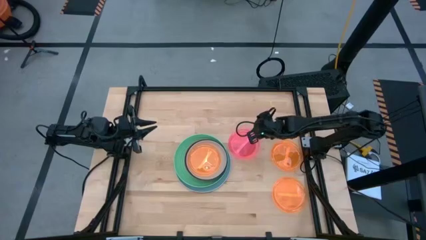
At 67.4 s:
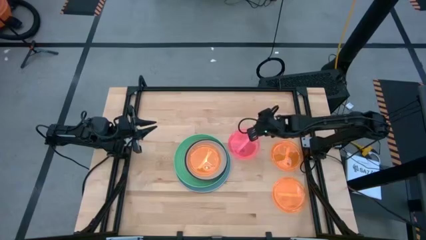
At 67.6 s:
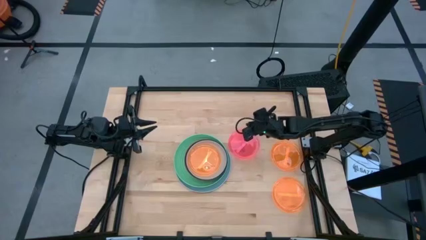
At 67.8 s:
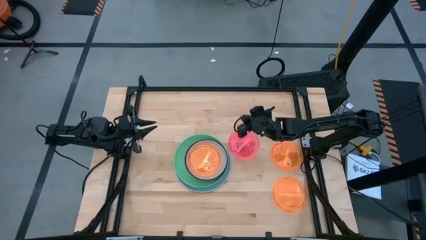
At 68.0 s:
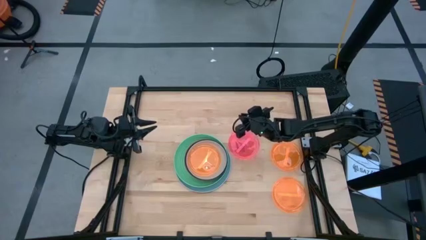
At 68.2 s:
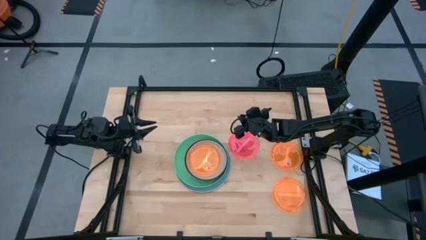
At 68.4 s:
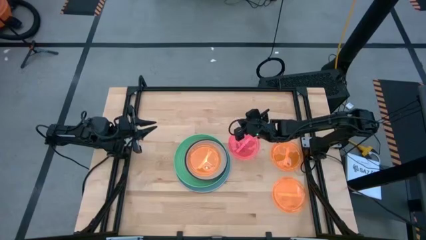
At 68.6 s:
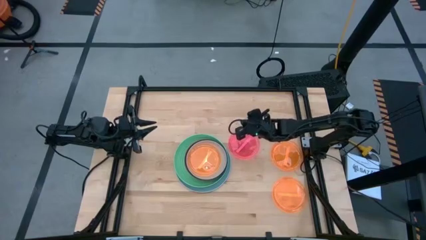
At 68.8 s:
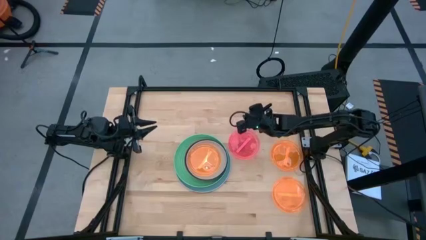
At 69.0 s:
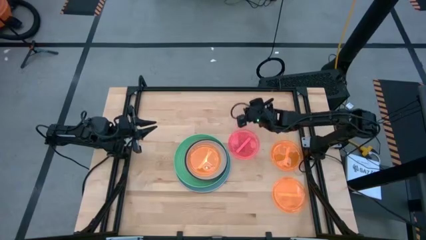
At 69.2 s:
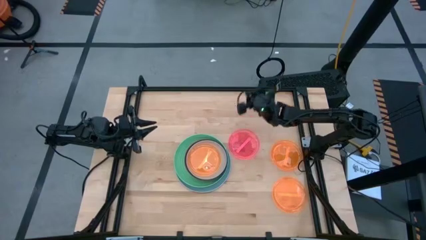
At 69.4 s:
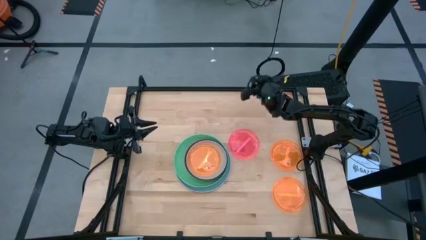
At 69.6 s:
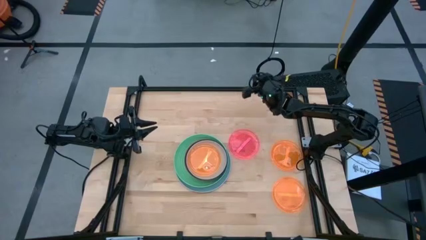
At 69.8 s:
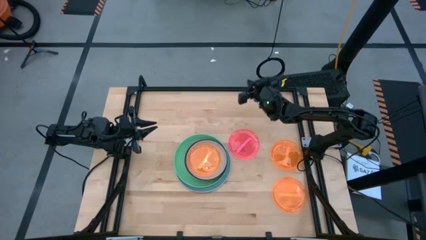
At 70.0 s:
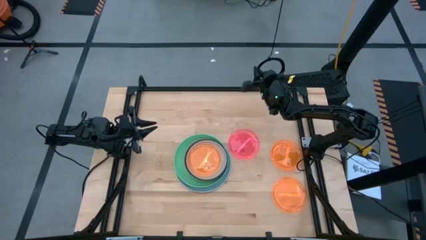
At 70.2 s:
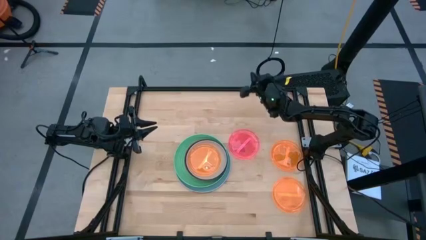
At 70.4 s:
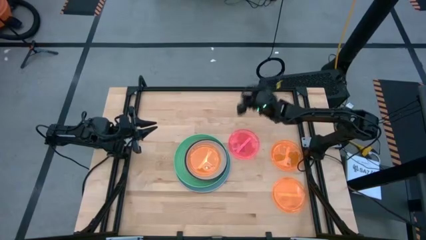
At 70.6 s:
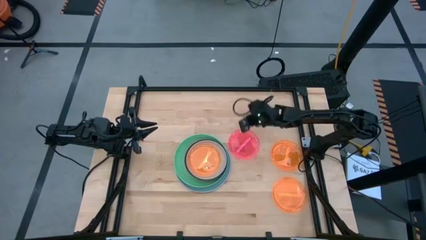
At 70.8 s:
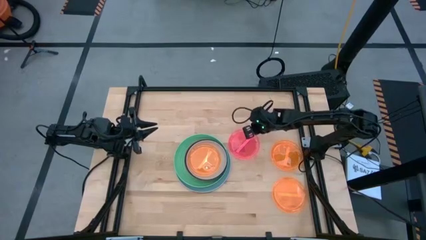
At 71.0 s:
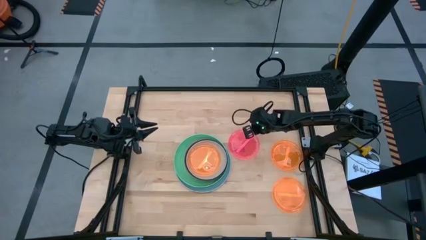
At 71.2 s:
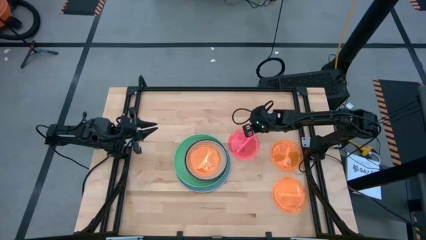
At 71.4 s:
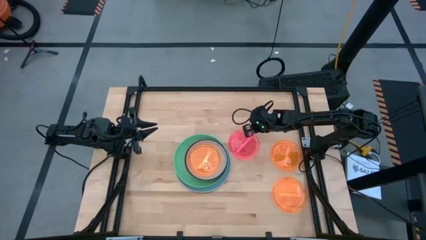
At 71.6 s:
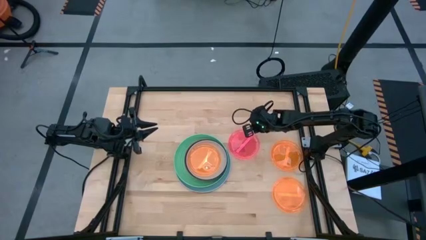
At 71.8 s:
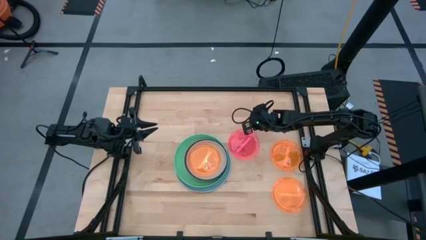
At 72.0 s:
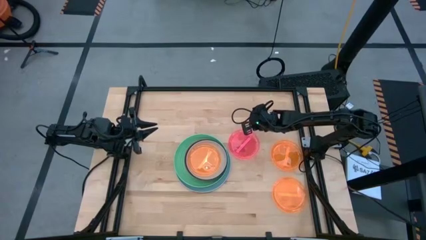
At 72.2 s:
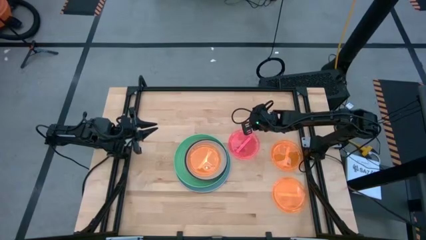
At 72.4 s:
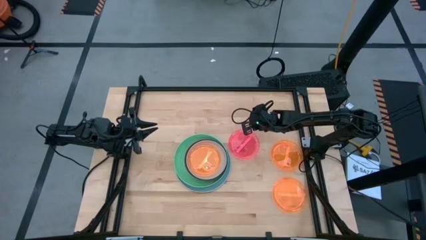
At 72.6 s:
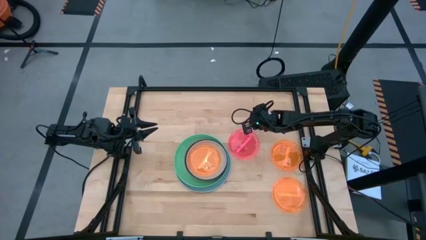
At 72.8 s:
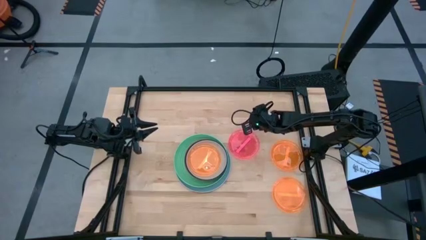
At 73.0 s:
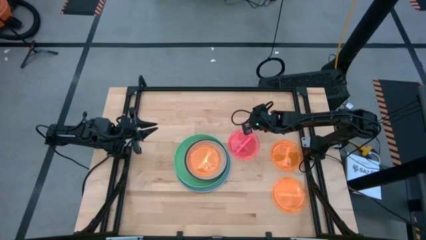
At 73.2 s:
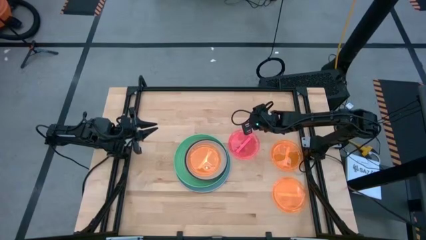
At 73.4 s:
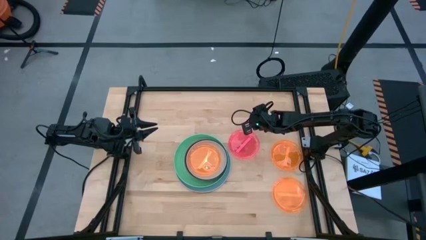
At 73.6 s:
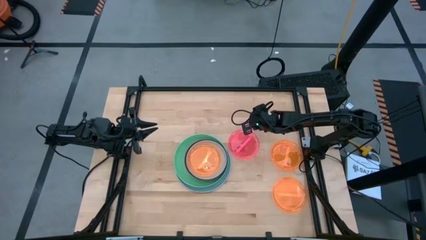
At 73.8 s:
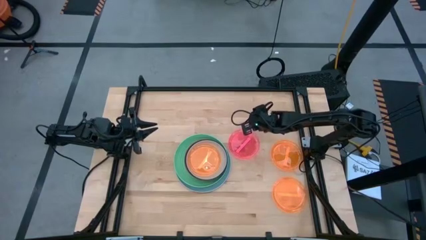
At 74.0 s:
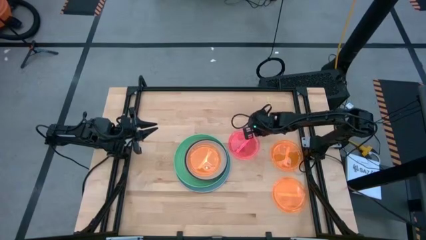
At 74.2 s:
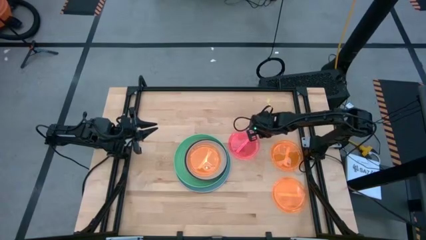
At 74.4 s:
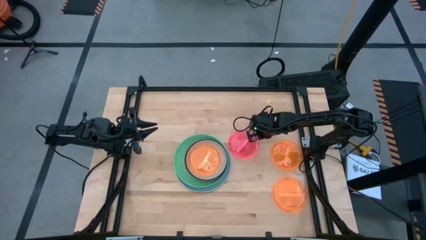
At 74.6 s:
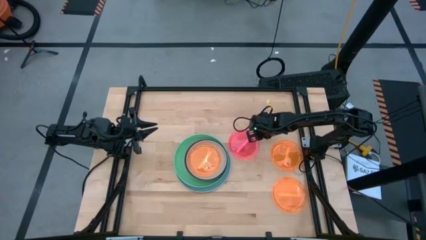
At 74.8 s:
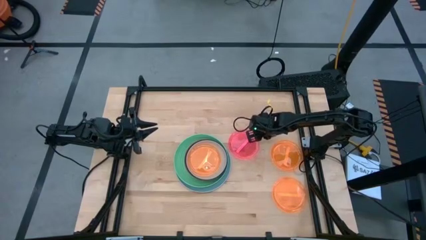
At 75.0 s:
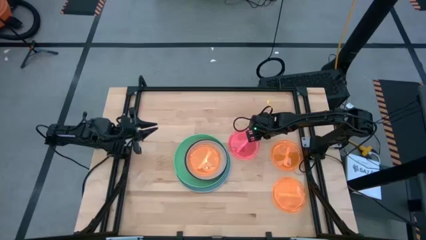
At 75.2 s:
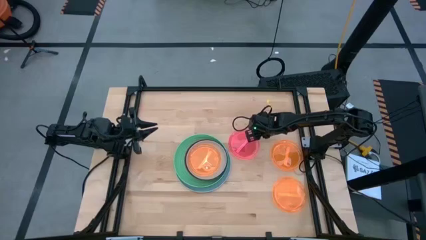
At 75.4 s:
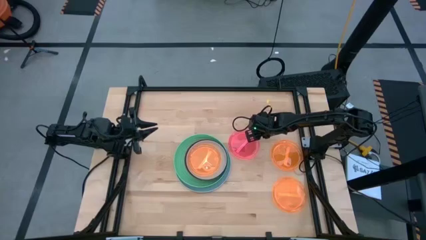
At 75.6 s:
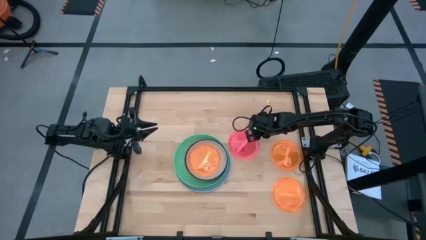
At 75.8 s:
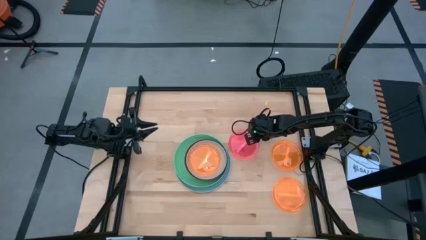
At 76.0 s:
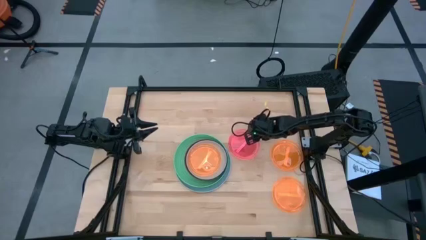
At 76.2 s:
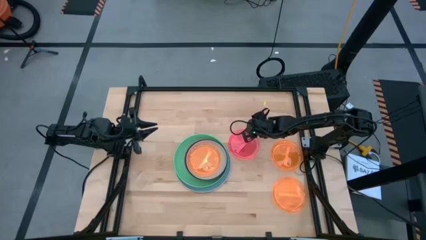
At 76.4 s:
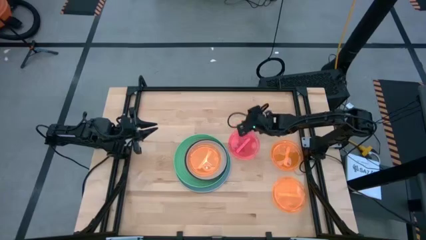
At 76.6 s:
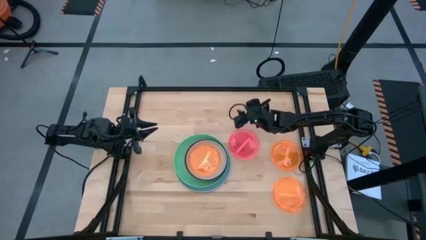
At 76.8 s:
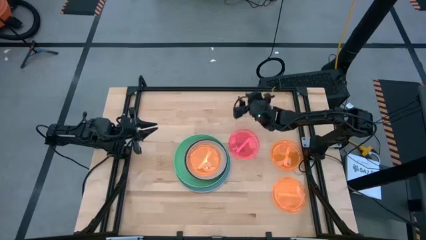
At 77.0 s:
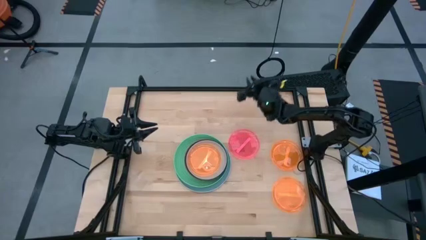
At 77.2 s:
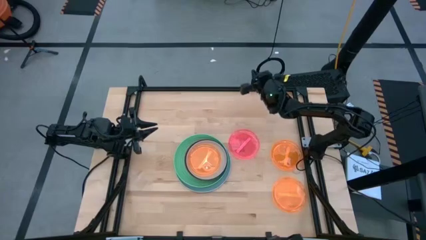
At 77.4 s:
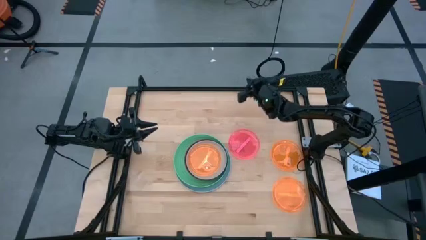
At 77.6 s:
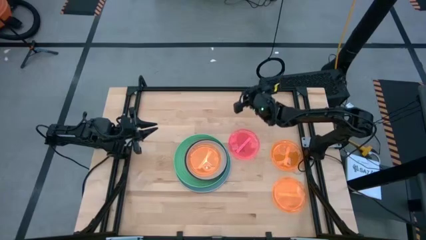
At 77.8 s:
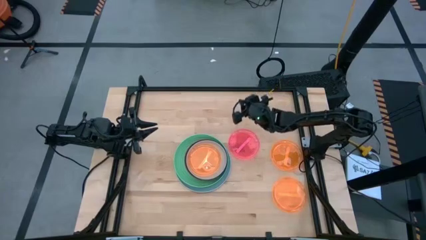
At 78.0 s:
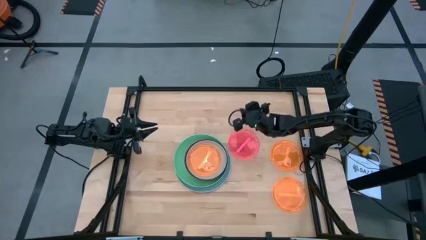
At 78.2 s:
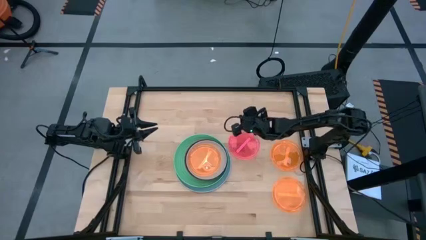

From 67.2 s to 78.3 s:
Task: Stack plastic plates
Stack the transparent pink plate on top of the transparent orange plate
